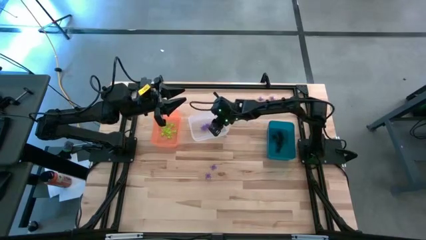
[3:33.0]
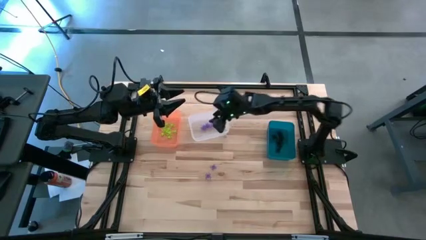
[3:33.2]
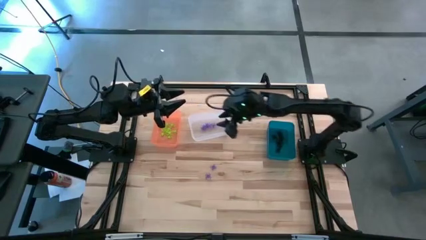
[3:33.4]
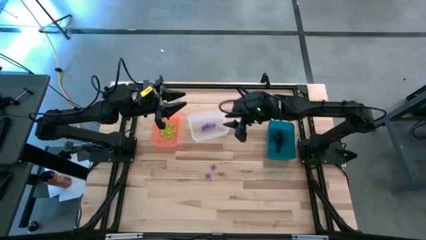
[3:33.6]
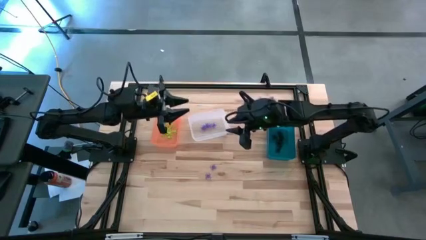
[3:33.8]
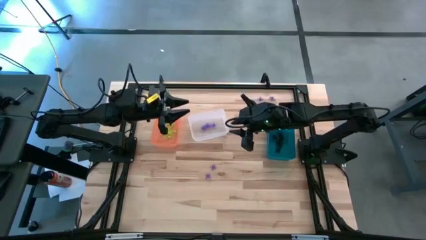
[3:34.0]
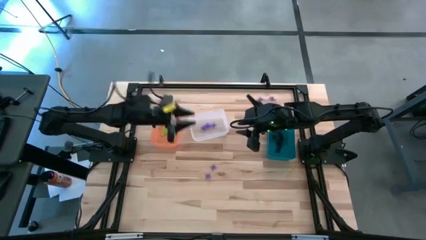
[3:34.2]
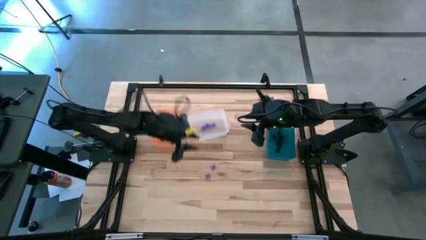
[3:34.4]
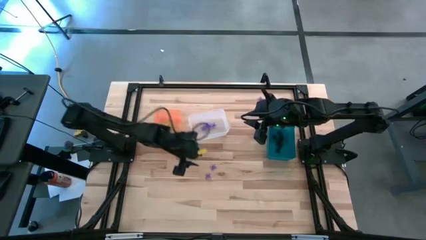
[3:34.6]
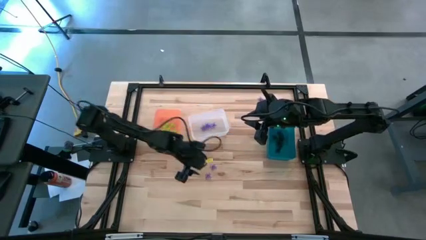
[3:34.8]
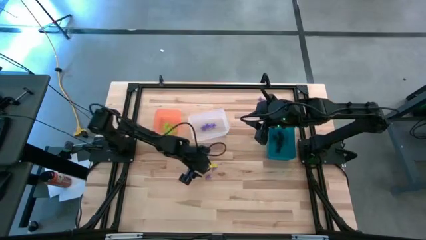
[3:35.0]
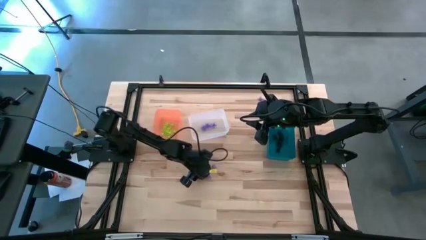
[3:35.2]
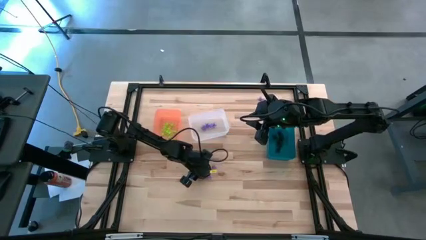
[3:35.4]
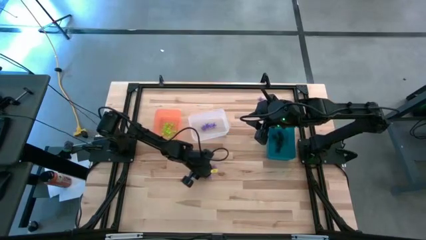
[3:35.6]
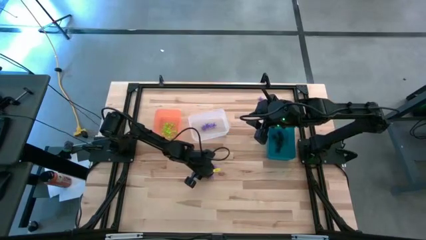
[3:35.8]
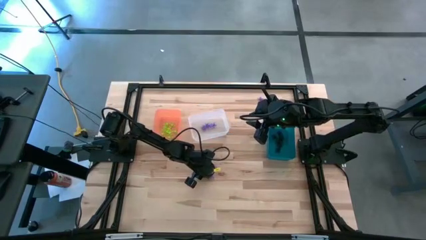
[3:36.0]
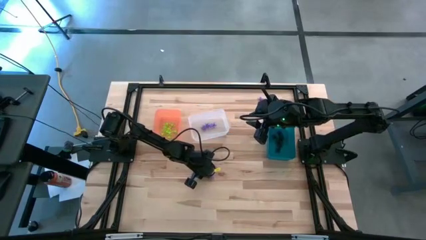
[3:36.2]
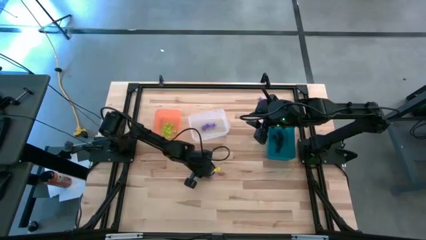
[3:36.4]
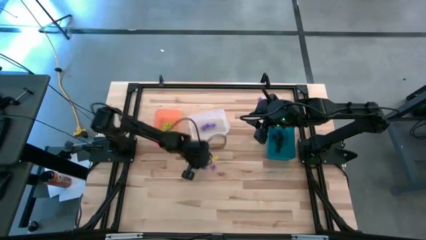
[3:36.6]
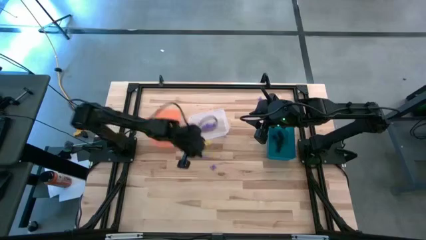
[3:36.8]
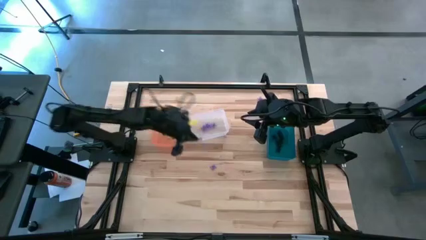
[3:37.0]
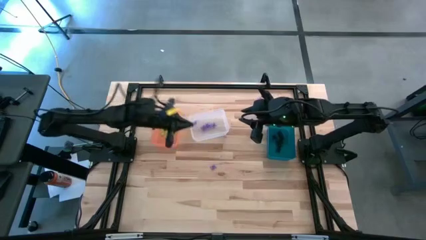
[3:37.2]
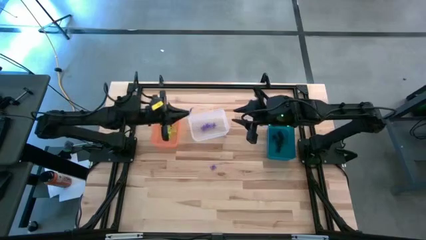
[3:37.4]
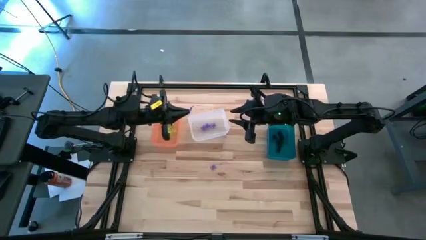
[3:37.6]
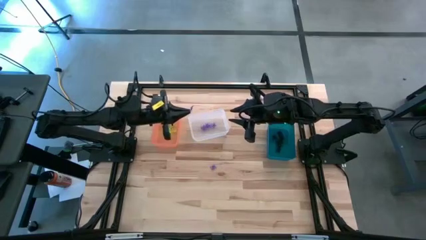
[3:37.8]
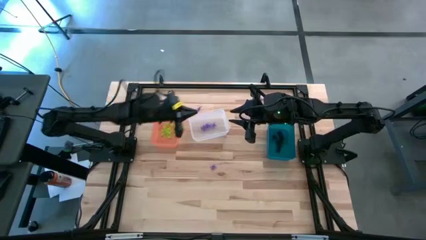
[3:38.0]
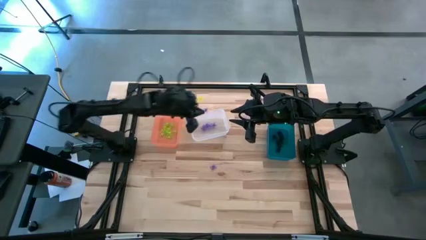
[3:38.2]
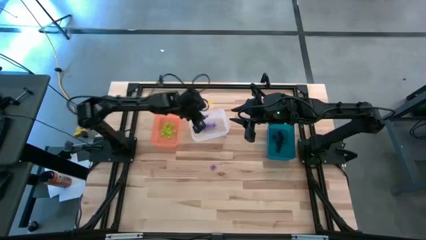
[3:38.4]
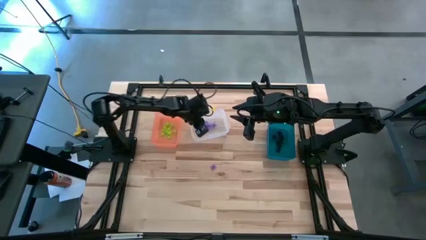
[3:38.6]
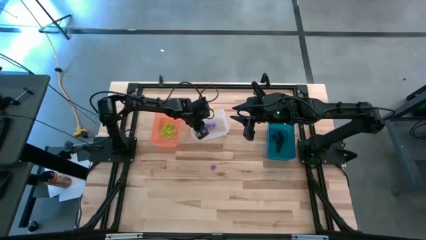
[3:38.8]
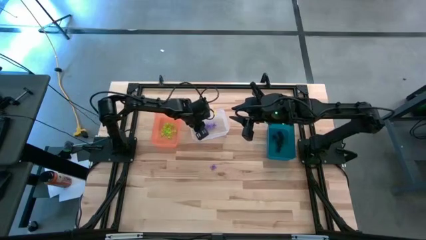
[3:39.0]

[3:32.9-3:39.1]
Task: Sort Halloween decoration
Put the purple spider toy into the transparent bin

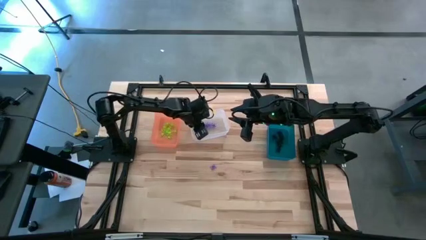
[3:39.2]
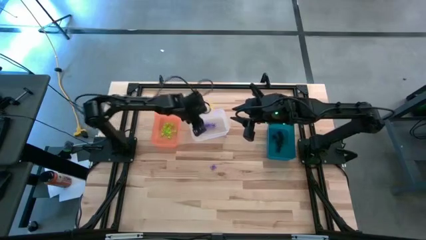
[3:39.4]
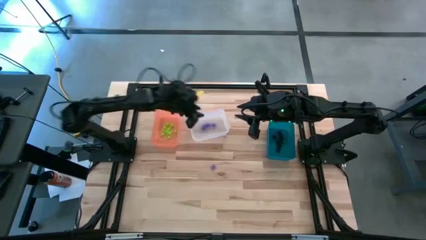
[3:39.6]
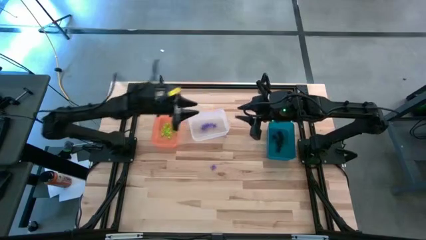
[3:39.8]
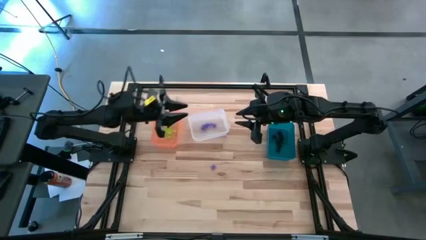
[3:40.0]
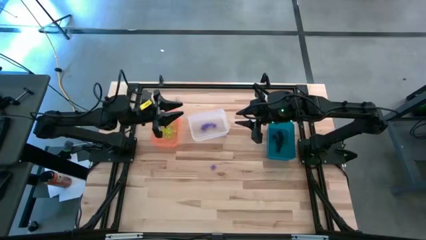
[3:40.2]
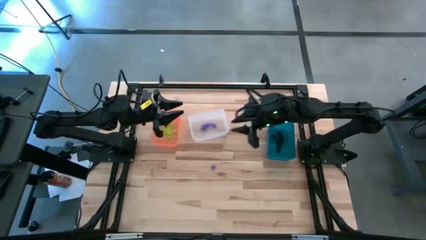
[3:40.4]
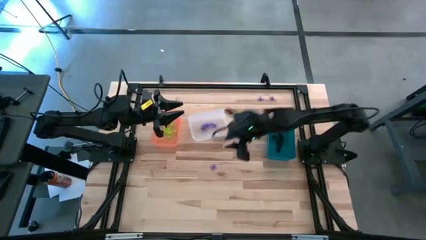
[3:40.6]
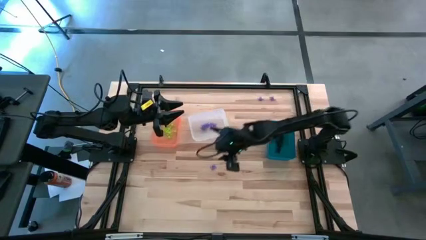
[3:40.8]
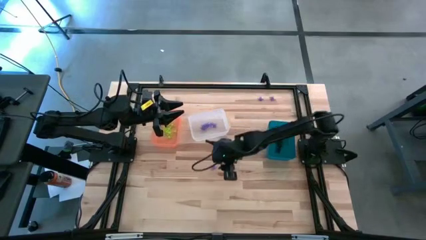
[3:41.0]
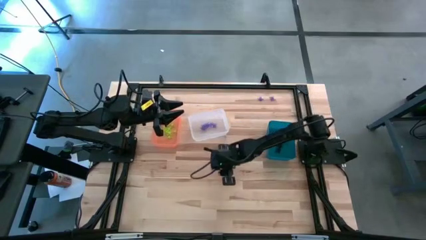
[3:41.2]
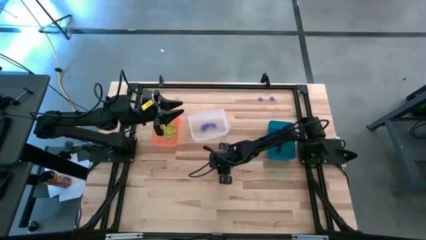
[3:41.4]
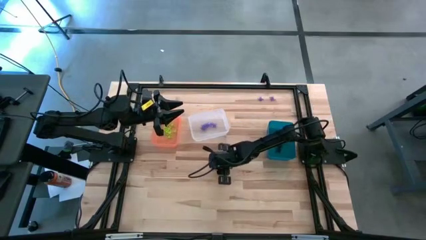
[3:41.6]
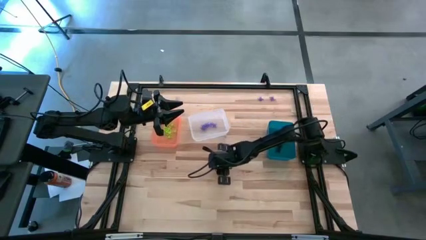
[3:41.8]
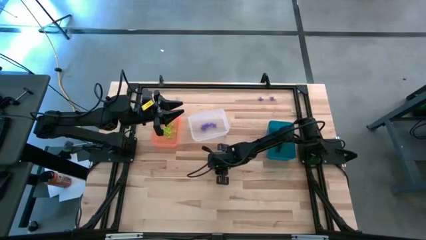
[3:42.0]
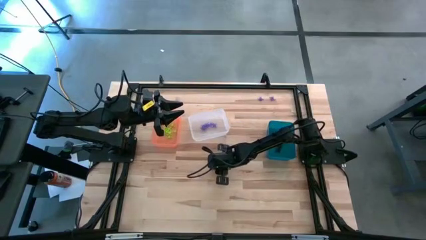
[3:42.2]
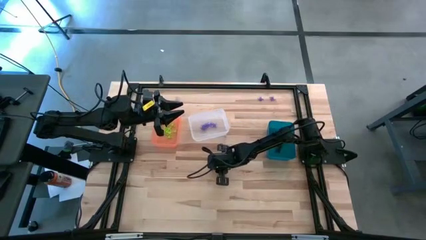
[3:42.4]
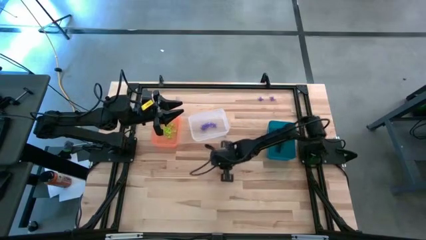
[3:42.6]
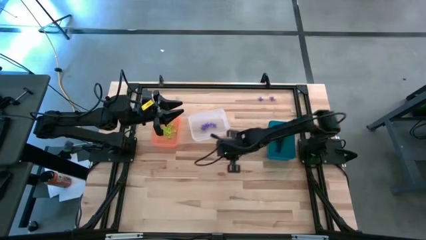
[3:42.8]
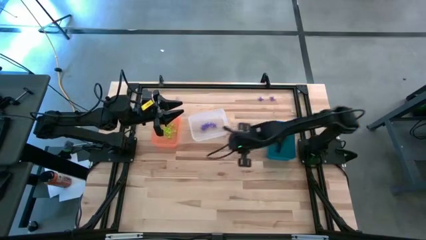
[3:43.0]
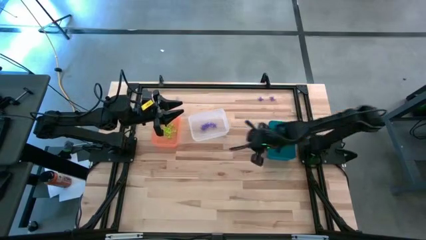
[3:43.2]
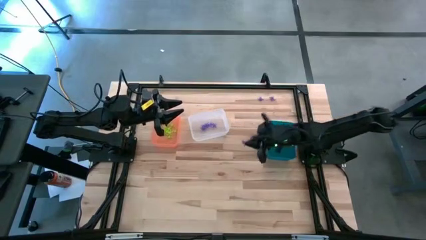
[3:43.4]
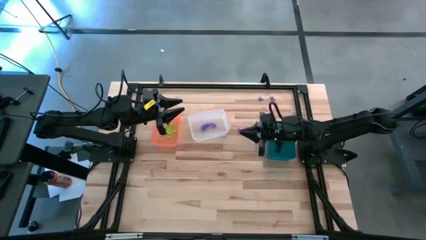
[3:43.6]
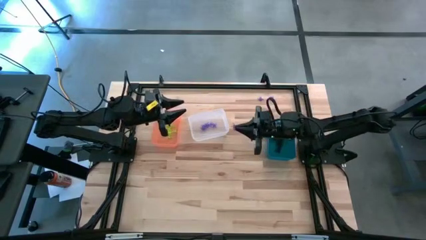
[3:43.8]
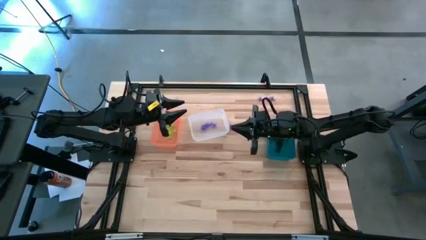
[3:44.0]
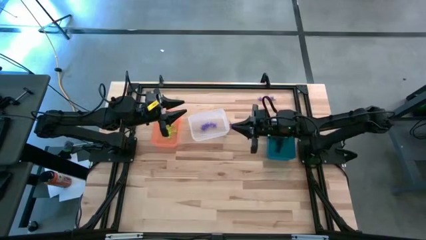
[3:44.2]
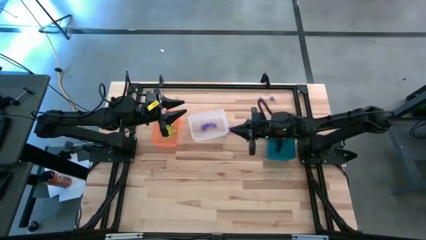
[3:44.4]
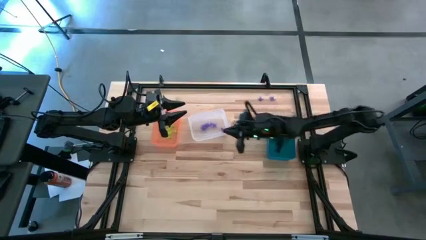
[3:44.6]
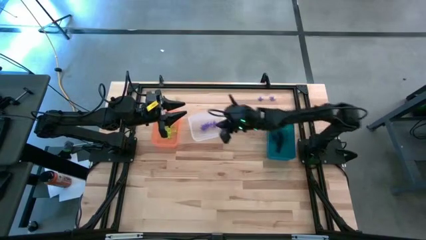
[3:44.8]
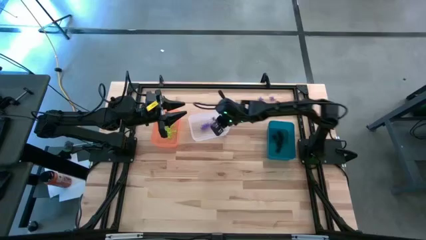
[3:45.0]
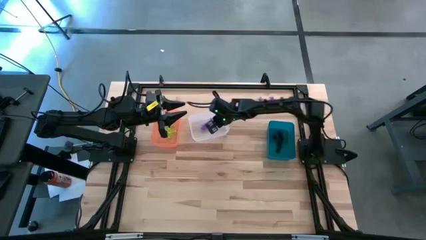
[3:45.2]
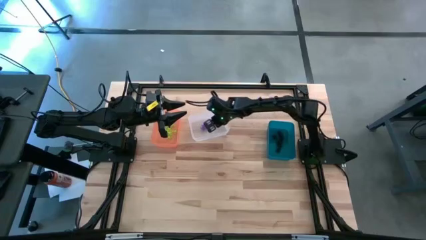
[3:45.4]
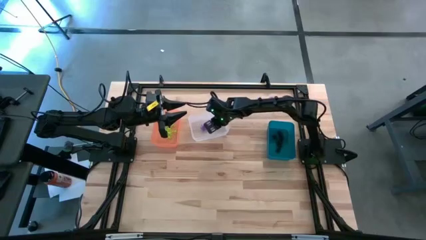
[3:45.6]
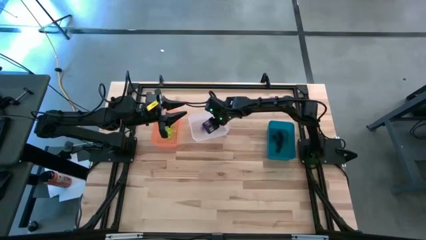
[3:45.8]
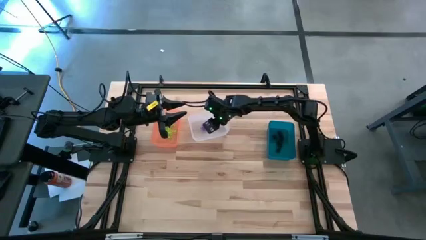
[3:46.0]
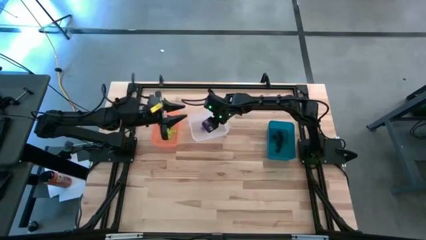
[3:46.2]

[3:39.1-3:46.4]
Put the purple spider toy into the transparent bin

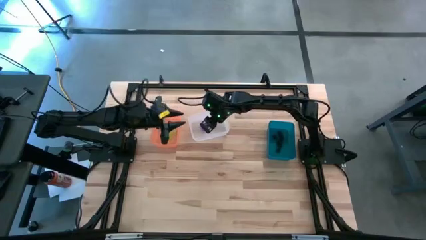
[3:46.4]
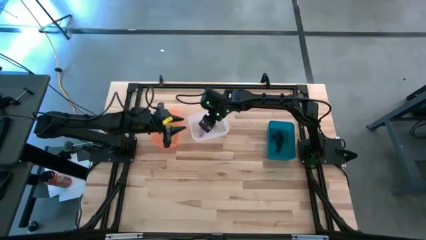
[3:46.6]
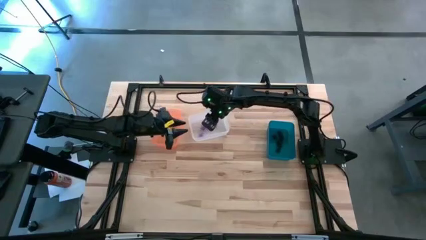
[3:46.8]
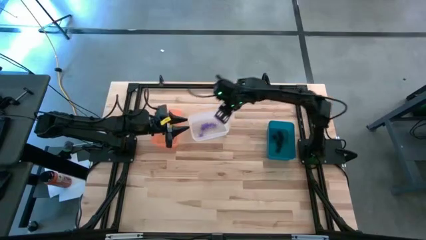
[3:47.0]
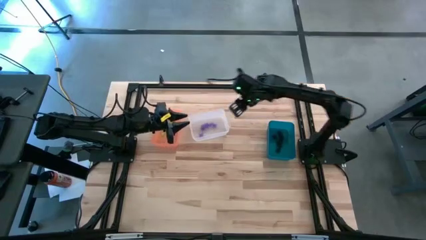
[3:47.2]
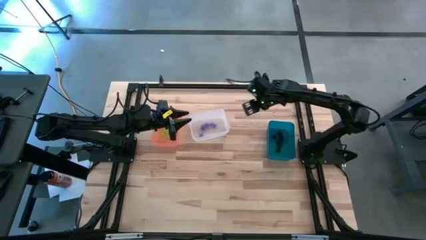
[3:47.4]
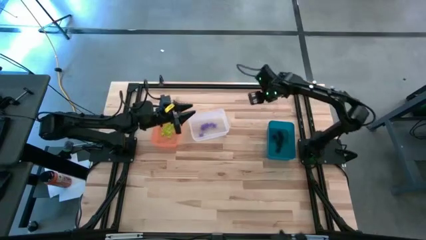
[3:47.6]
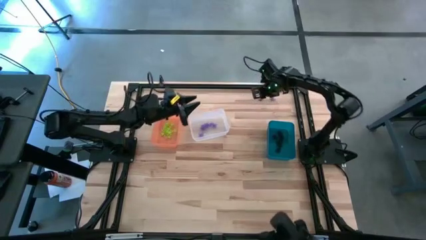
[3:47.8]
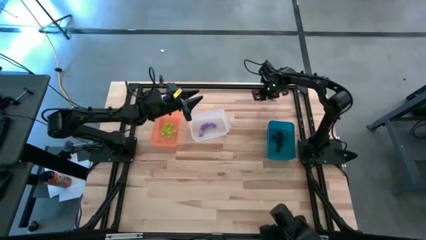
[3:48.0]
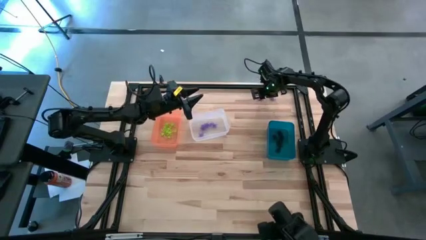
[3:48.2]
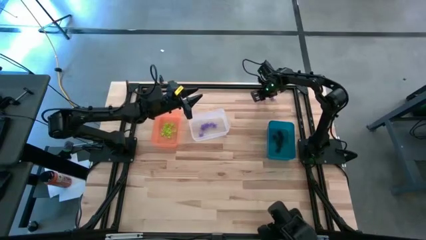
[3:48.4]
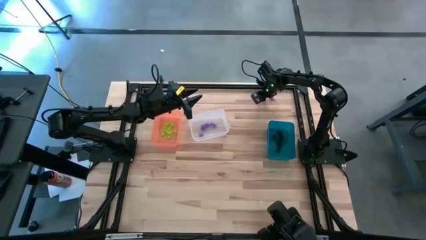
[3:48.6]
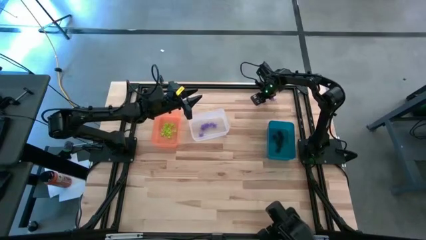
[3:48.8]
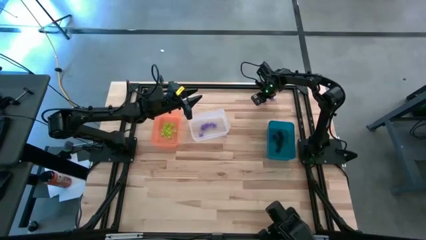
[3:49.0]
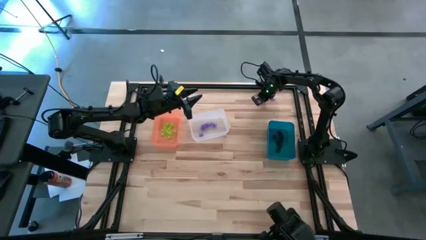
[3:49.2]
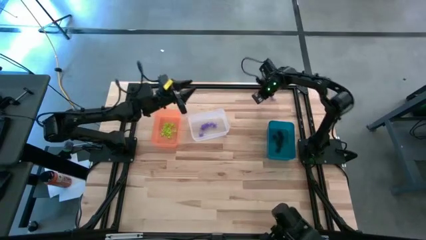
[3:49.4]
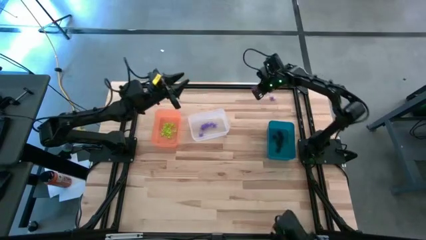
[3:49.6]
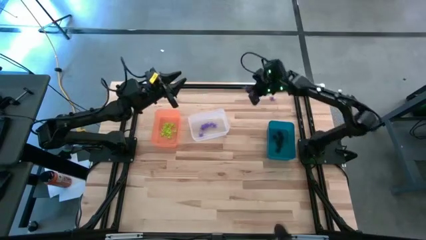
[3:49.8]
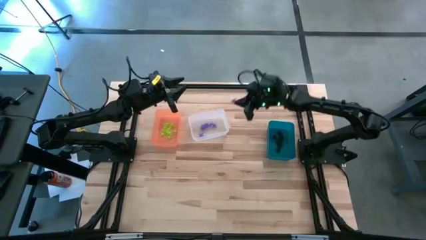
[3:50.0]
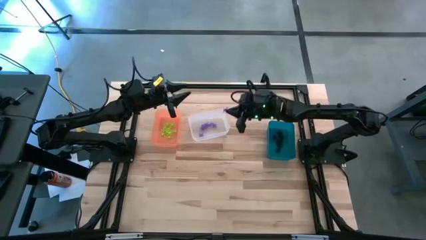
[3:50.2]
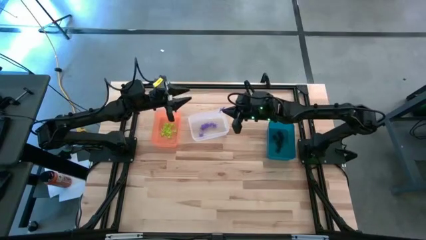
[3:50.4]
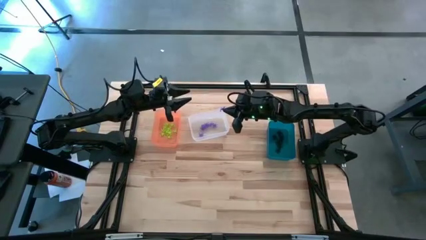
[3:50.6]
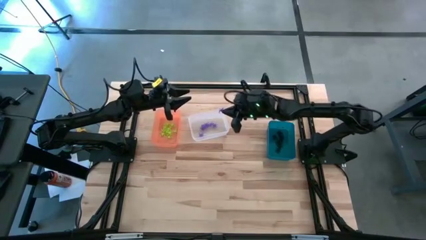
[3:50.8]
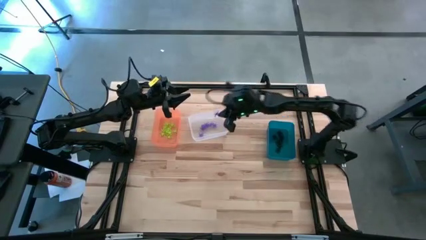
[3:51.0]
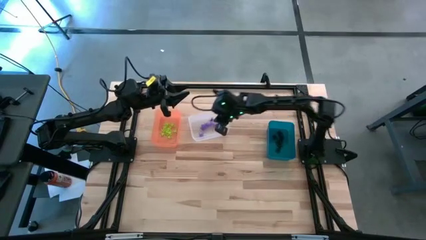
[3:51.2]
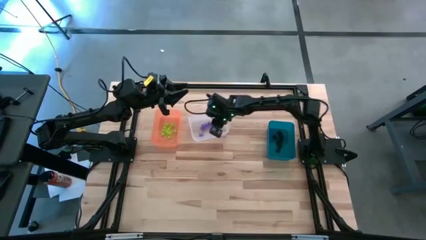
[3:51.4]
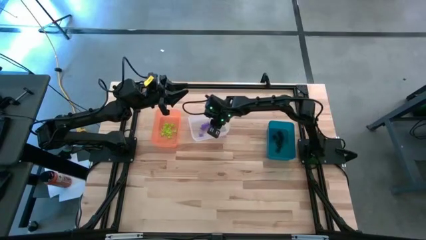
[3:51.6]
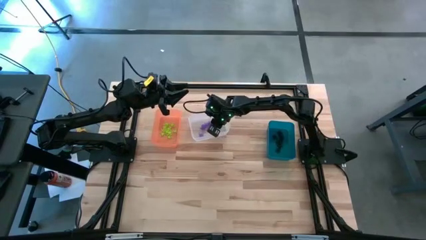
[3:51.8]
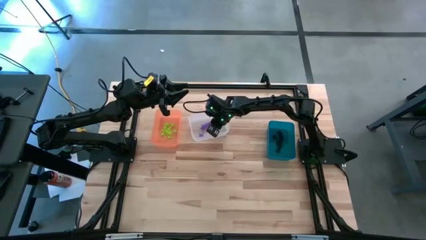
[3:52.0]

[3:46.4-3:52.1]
Put the purple spider toy into the transparent bin
